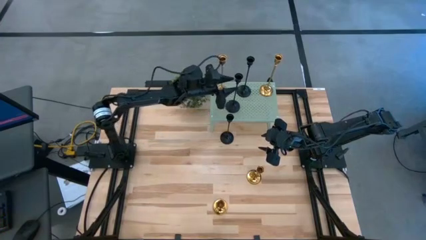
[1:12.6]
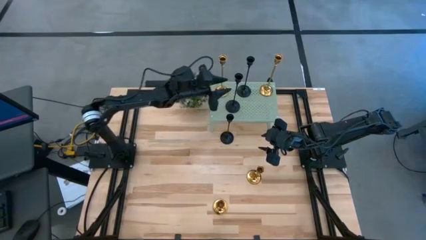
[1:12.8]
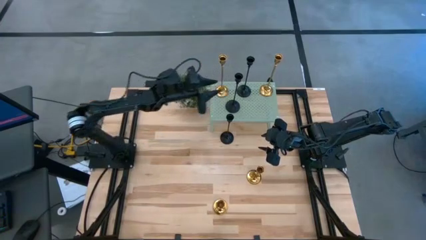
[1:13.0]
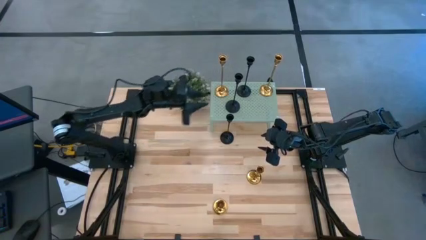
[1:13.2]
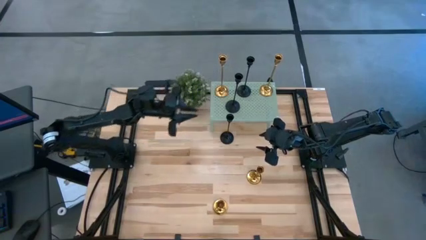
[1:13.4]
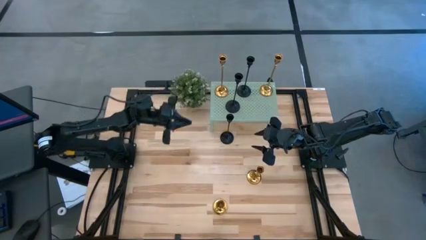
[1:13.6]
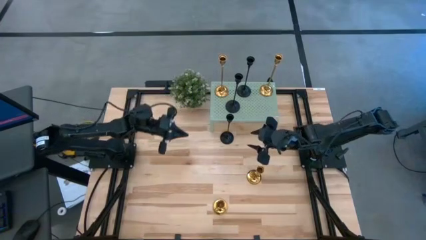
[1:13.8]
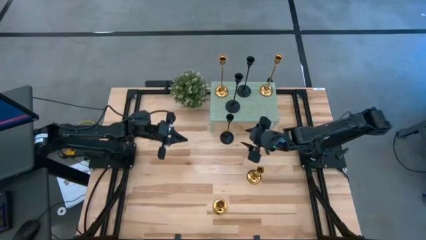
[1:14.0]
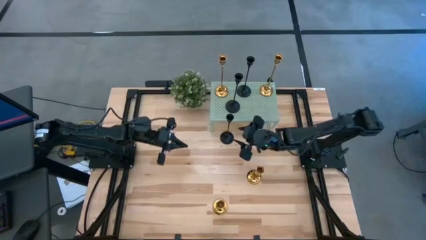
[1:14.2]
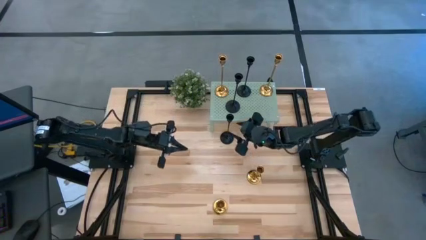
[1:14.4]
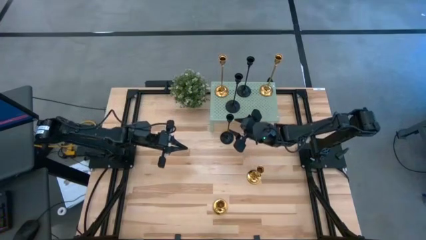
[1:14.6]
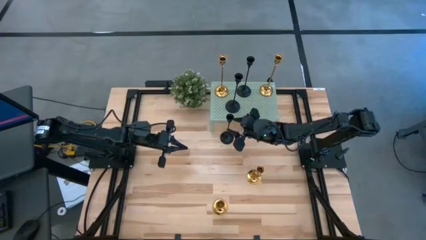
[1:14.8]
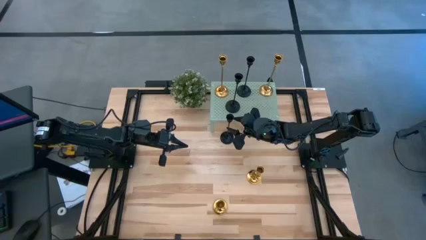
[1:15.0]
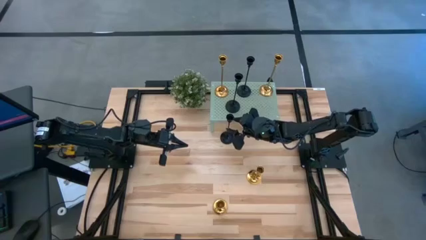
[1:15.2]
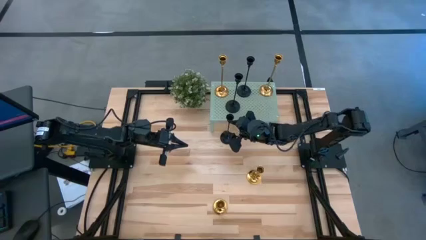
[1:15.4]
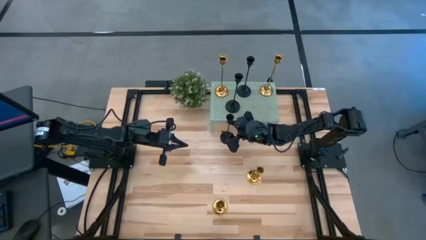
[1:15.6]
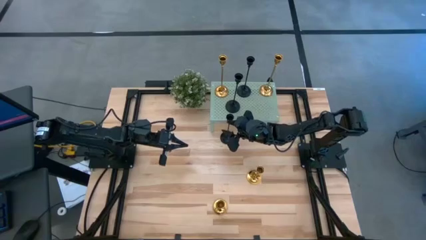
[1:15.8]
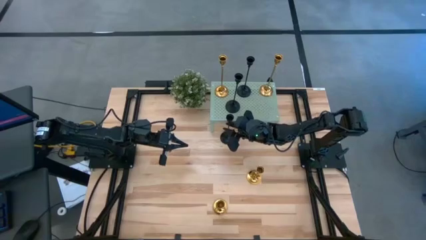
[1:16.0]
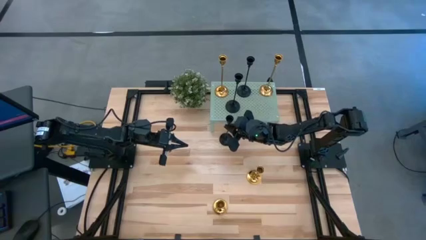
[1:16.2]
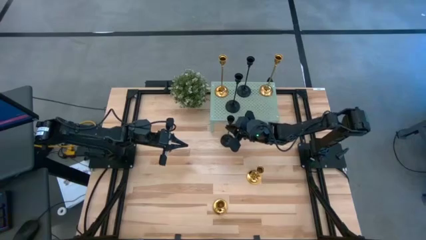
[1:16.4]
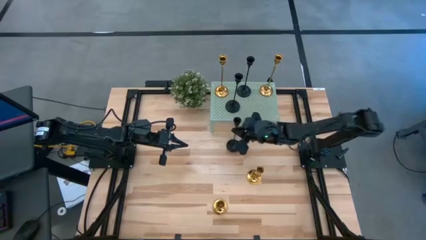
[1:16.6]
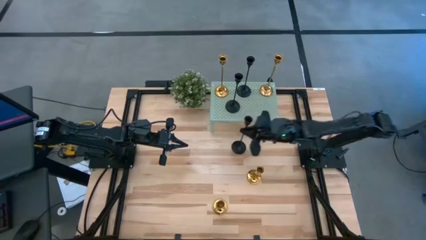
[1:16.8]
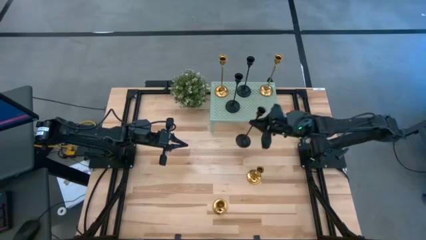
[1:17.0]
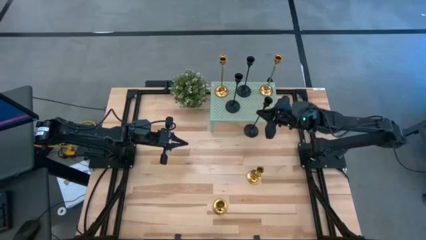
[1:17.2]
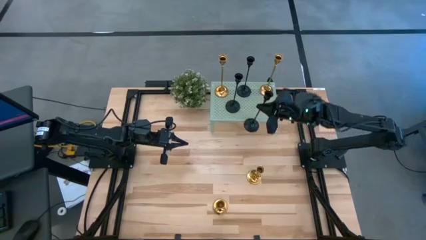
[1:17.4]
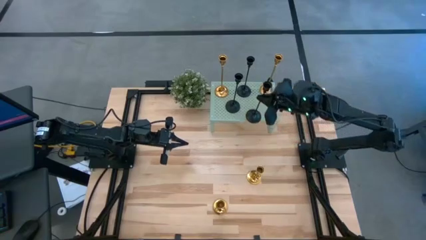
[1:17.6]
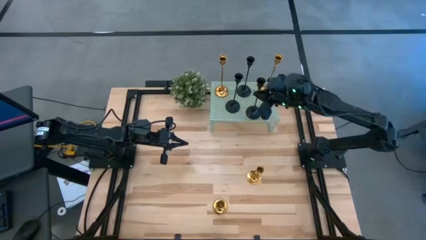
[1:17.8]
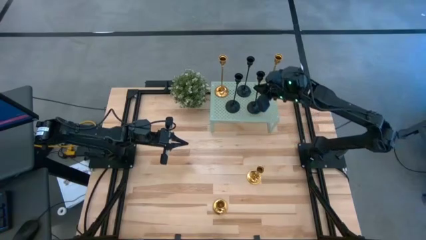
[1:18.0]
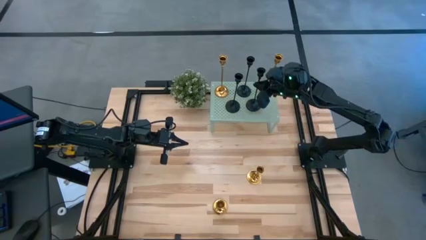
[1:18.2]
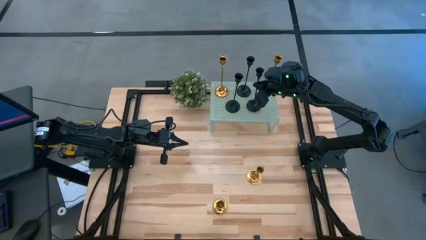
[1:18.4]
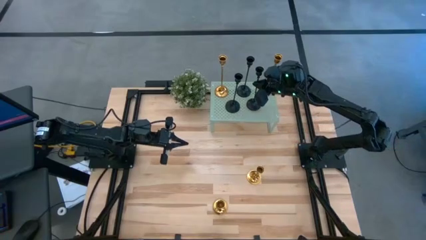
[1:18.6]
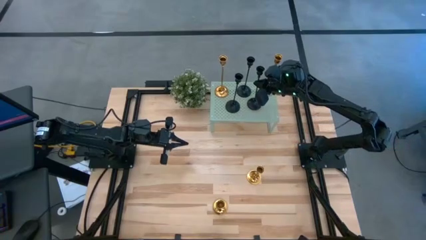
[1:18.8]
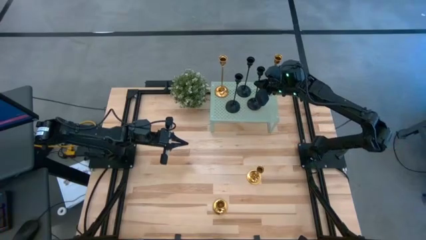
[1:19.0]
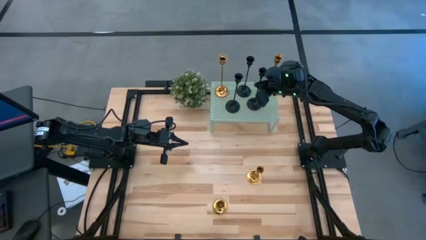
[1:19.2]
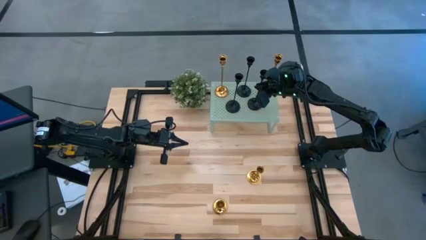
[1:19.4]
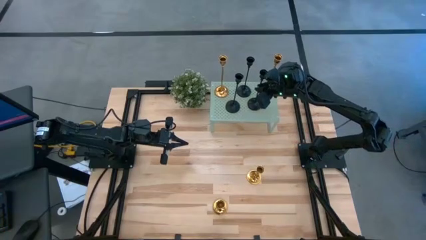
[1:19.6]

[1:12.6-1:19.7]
Task: Pick & Place candle stick holders
Put the black candle holder on the shelf

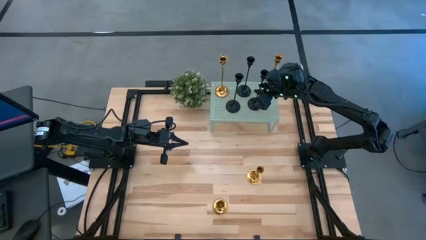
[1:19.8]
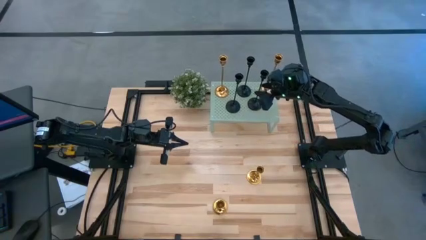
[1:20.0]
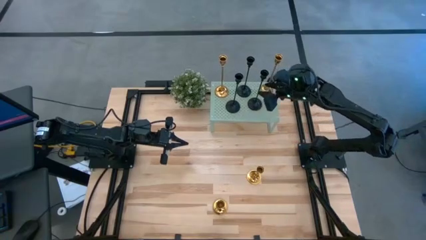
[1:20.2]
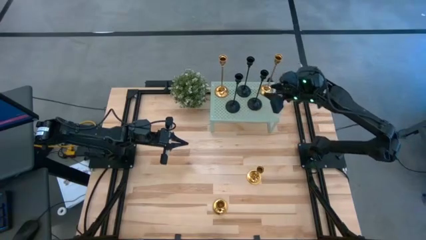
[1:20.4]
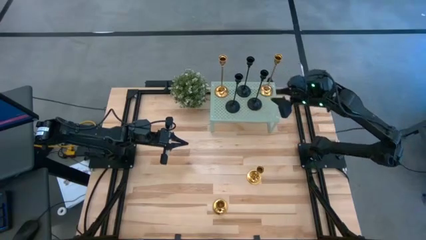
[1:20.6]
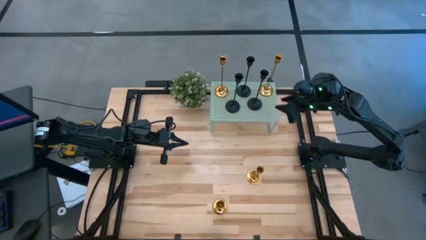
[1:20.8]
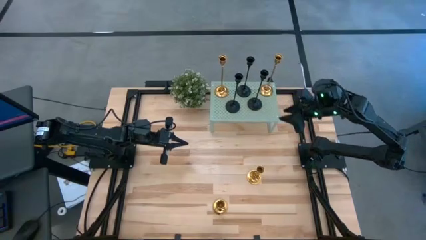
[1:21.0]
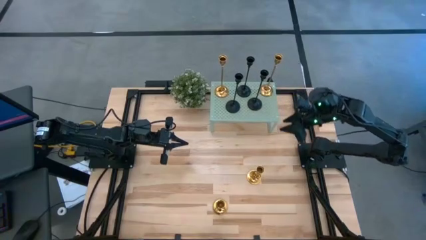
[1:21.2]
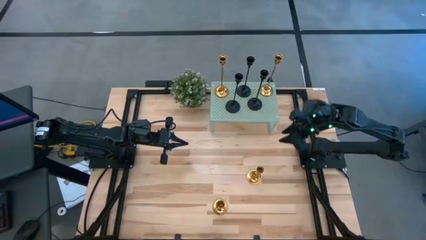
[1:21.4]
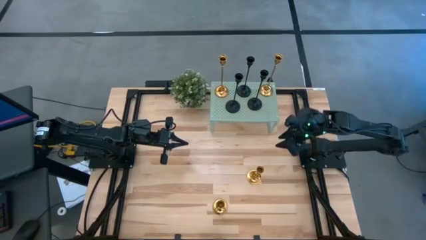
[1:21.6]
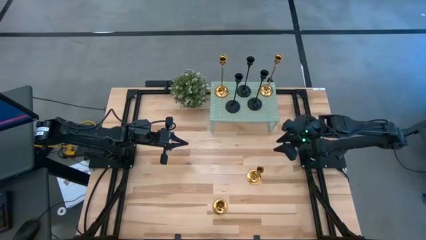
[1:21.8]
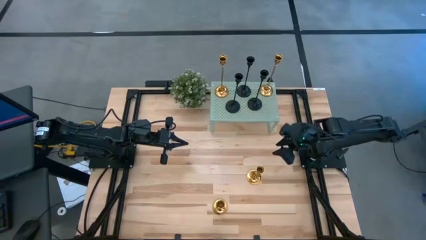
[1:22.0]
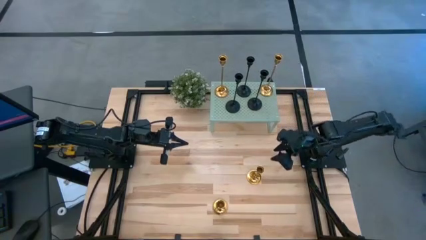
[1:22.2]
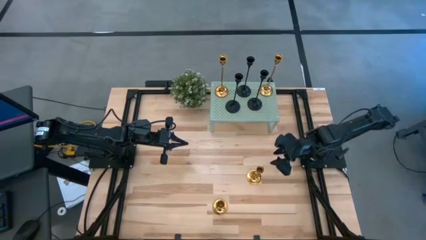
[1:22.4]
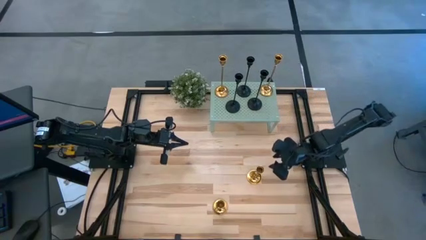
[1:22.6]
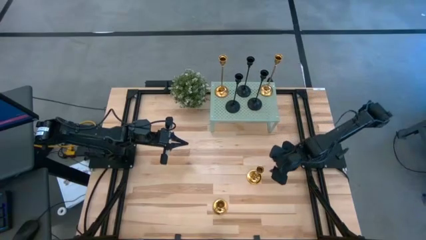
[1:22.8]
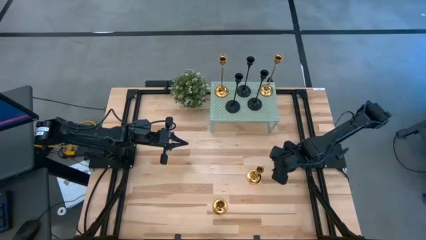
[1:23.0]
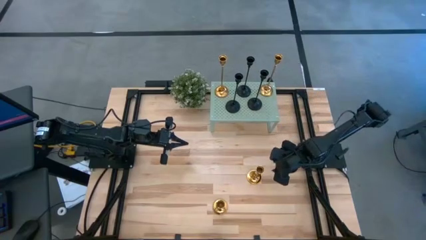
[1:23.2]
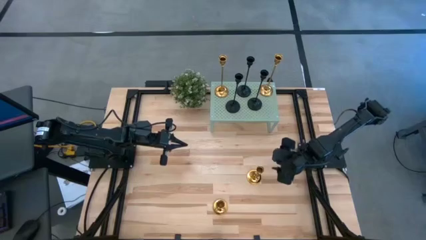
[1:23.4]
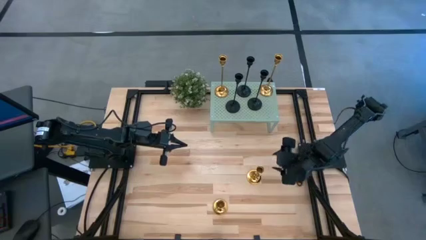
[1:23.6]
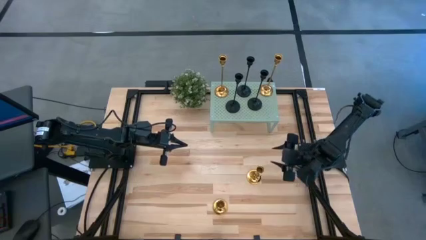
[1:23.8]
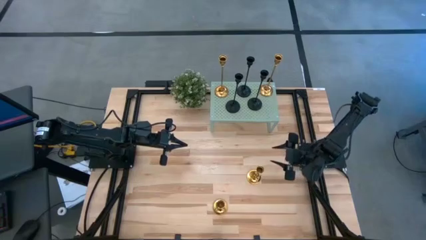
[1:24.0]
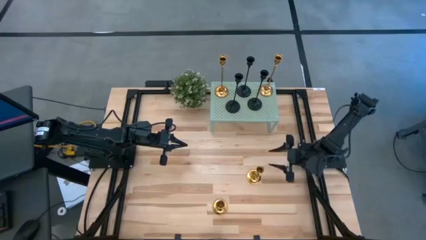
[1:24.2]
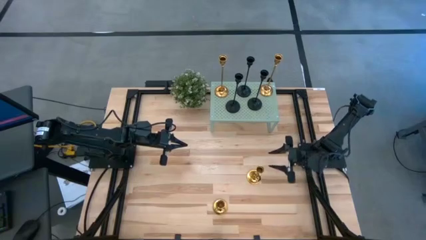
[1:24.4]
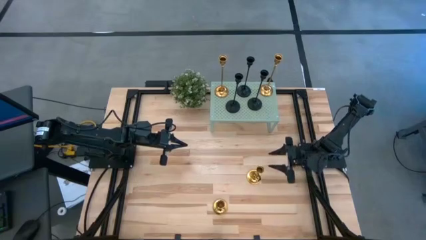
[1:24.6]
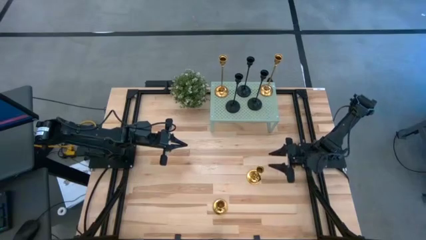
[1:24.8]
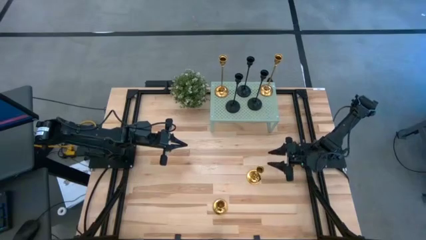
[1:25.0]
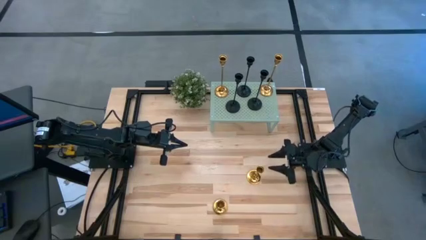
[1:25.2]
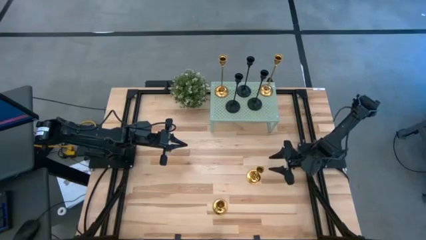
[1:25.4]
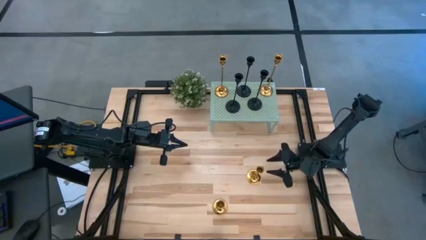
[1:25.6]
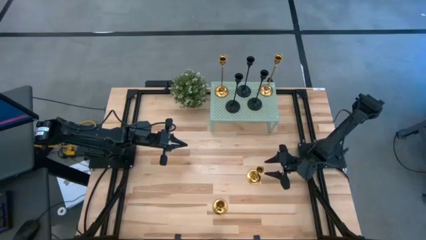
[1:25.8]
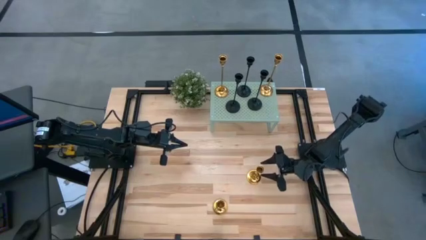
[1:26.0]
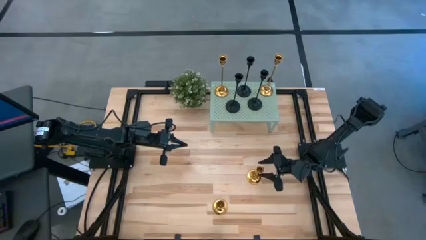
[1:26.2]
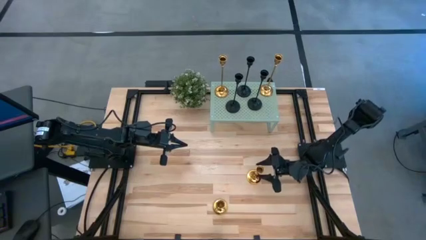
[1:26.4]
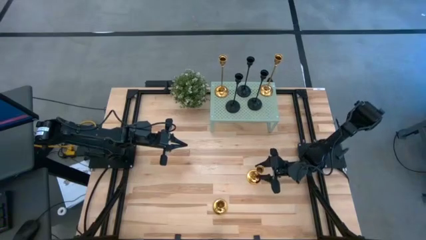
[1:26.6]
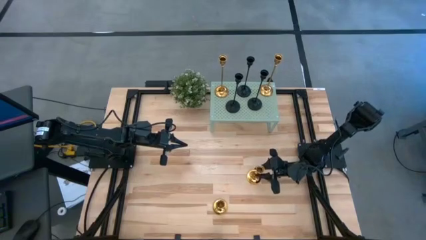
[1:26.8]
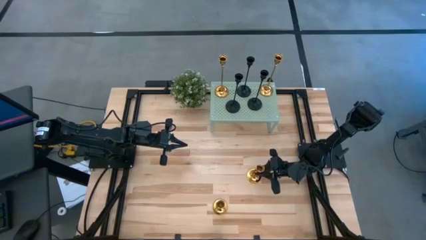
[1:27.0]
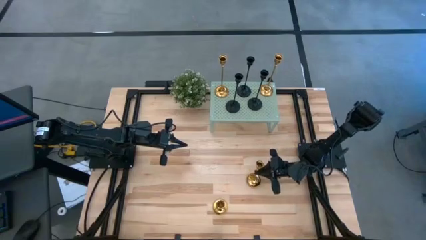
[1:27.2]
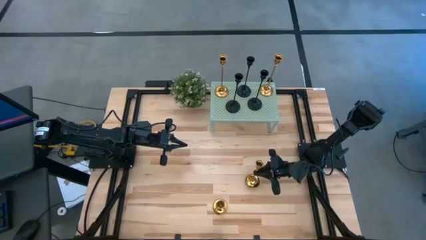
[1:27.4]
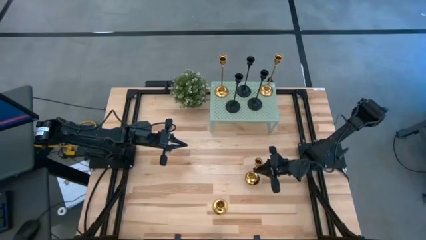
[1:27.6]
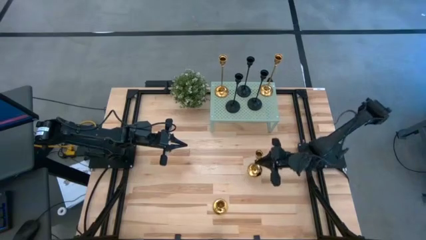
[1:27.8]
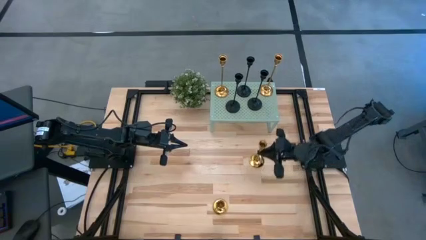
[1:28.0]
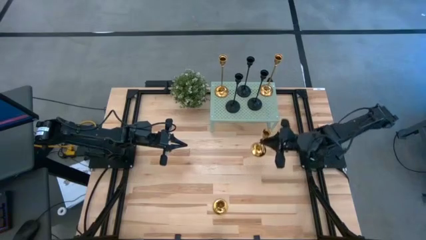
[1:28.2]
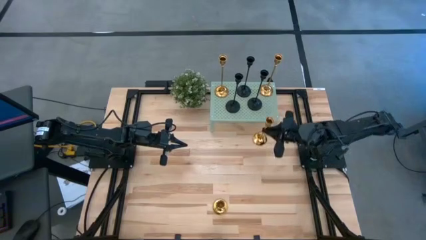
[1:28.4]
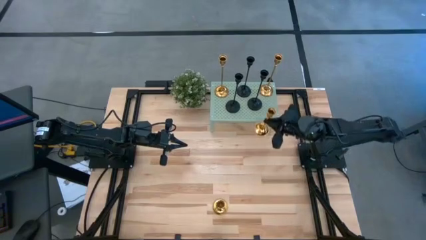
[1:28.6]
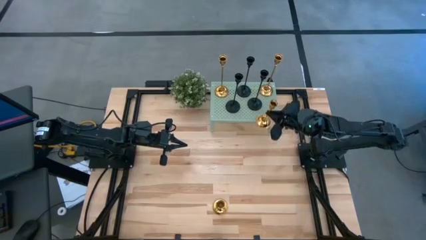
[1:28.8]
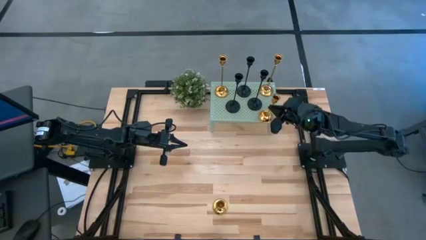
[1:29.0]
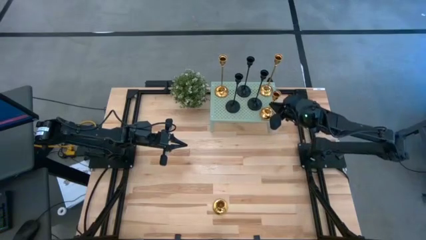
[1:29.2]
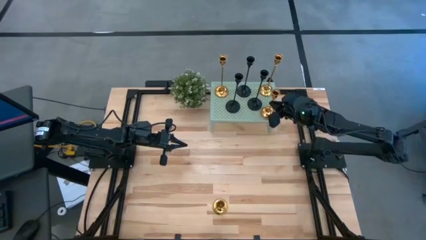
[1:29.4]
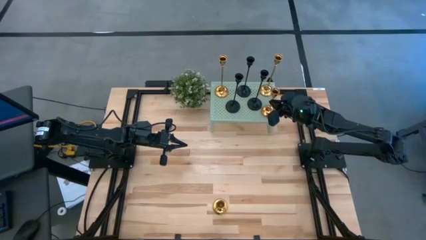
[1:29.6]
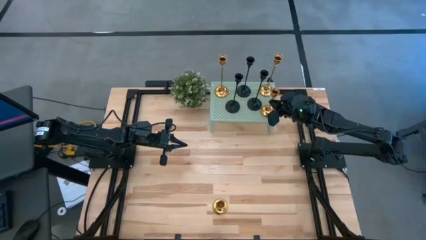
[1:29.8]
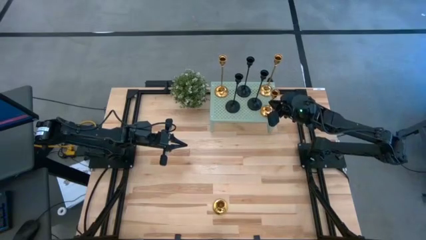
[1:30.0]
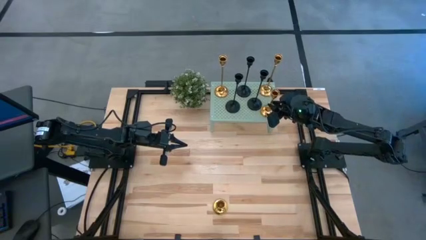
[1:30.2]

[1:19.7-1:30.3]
Put the gold candle holder on the shelf
